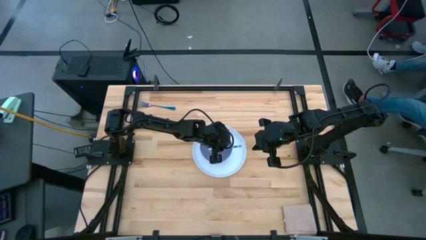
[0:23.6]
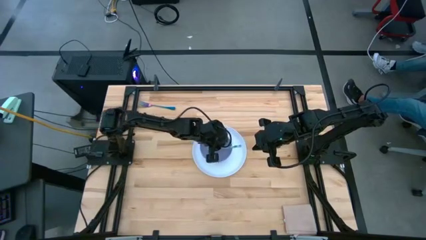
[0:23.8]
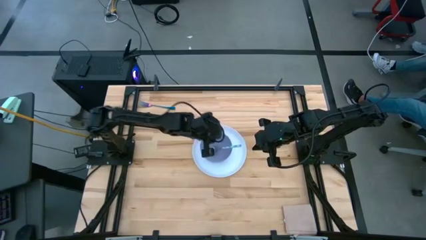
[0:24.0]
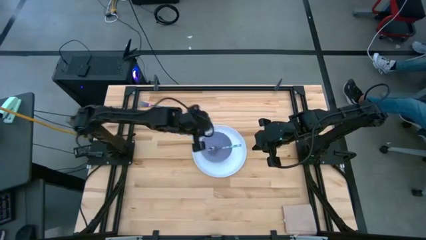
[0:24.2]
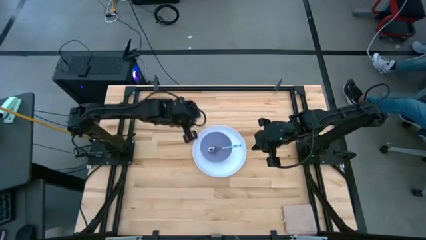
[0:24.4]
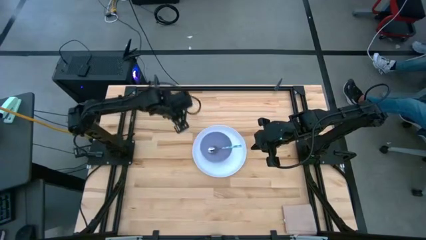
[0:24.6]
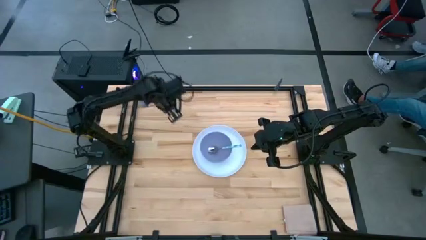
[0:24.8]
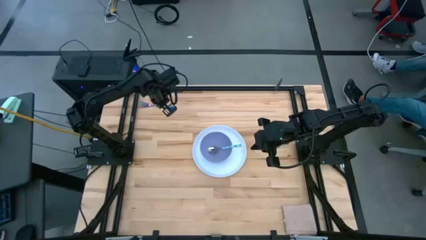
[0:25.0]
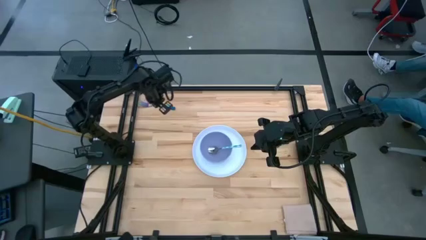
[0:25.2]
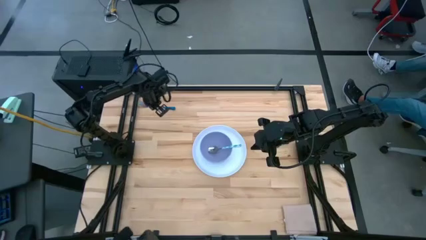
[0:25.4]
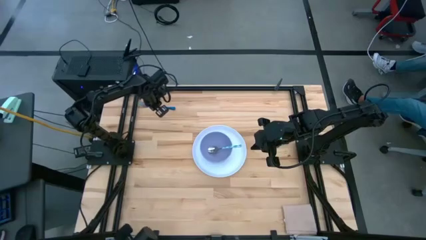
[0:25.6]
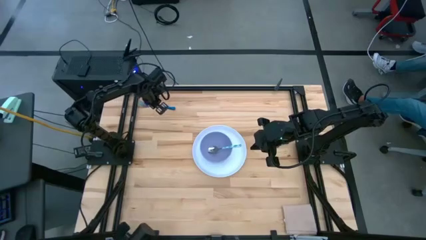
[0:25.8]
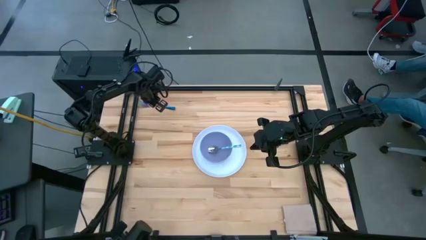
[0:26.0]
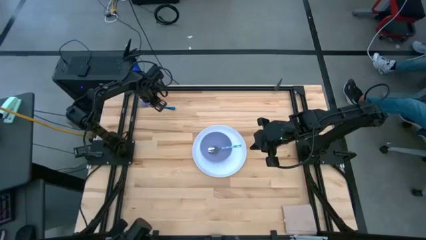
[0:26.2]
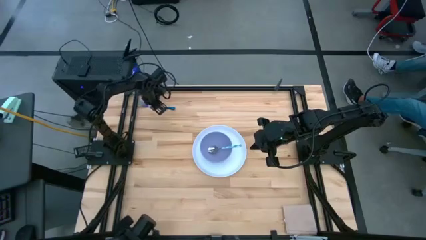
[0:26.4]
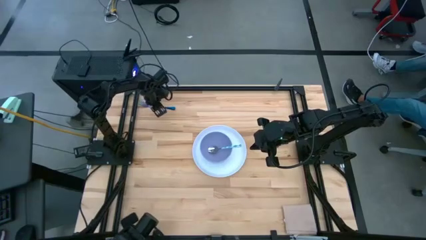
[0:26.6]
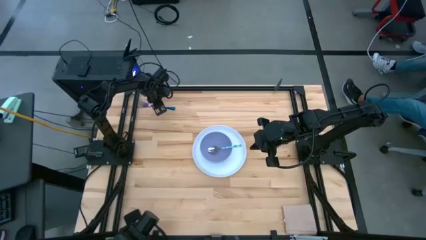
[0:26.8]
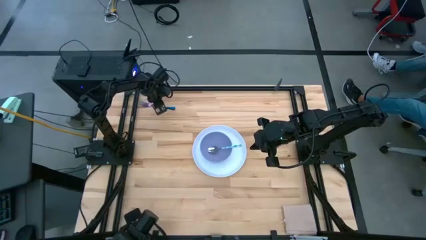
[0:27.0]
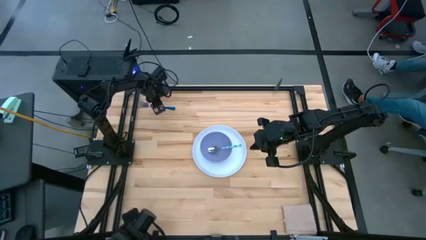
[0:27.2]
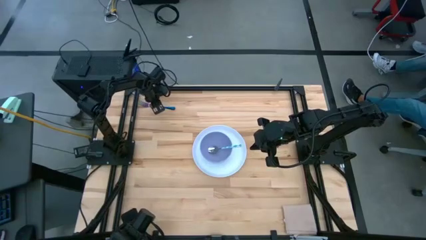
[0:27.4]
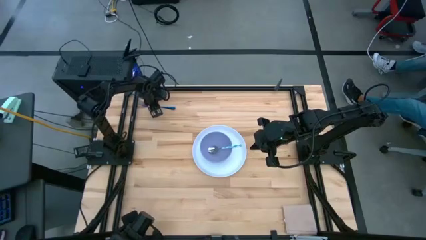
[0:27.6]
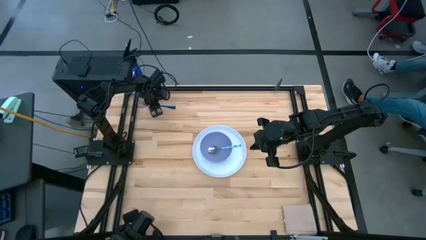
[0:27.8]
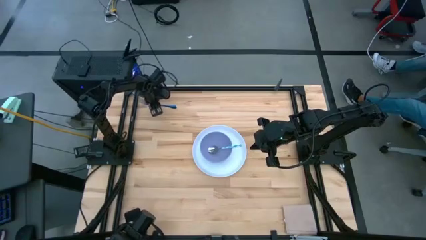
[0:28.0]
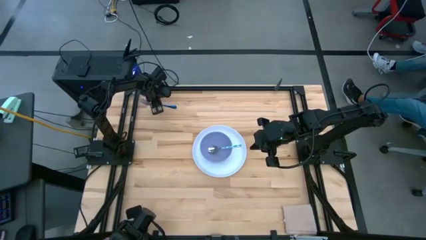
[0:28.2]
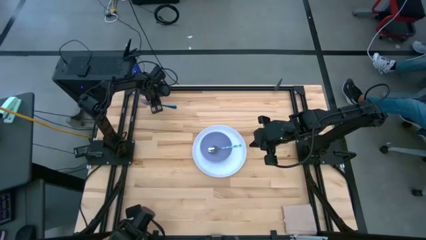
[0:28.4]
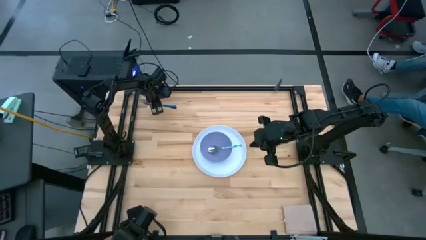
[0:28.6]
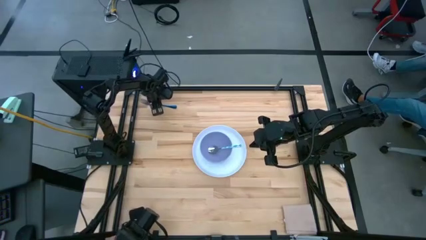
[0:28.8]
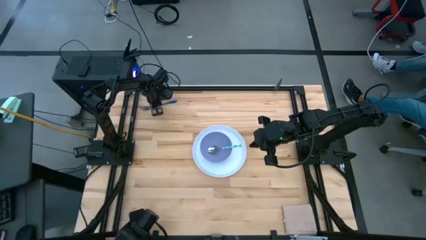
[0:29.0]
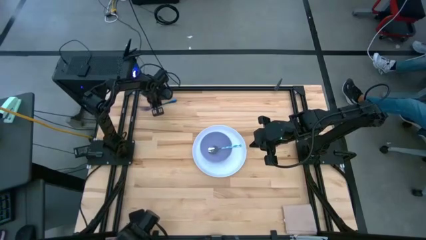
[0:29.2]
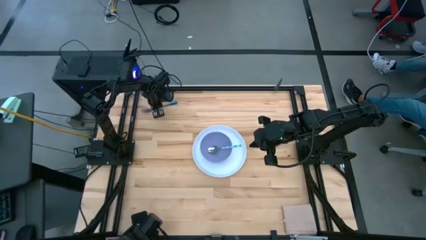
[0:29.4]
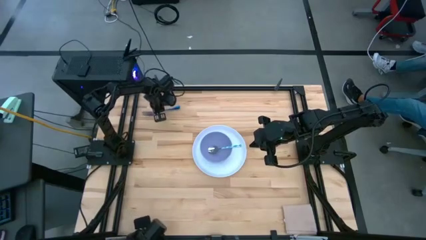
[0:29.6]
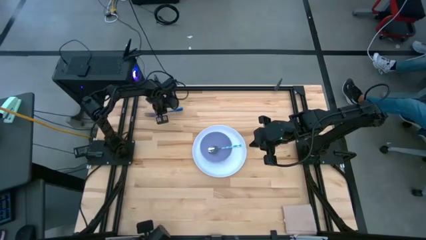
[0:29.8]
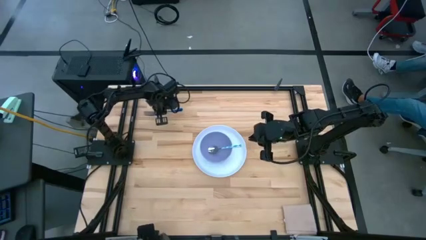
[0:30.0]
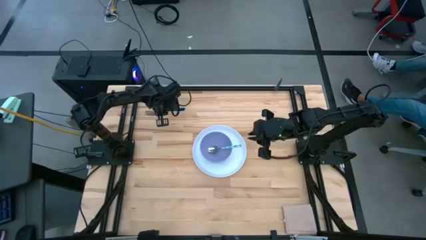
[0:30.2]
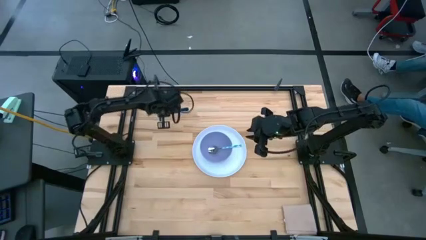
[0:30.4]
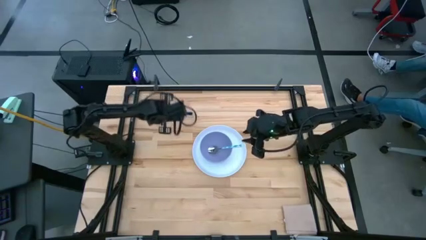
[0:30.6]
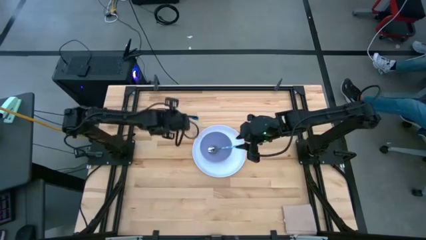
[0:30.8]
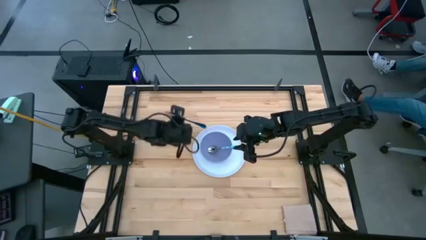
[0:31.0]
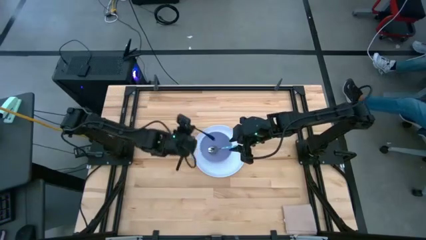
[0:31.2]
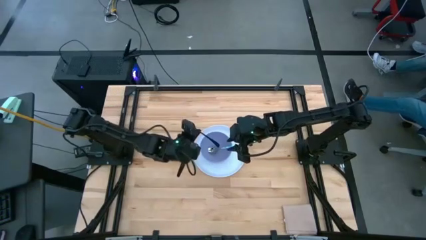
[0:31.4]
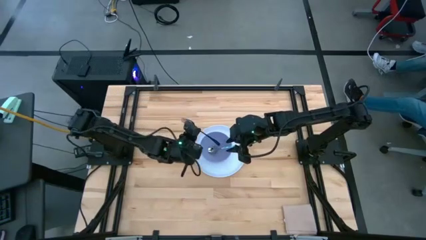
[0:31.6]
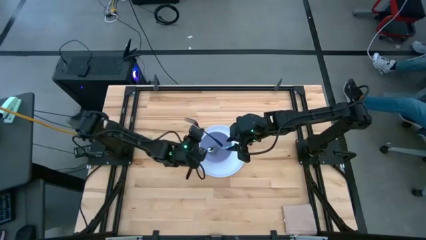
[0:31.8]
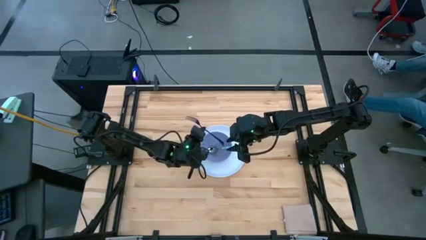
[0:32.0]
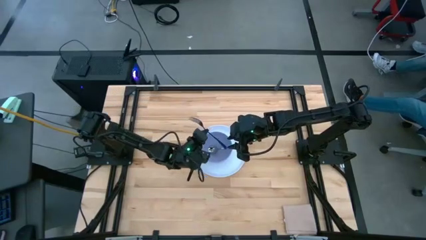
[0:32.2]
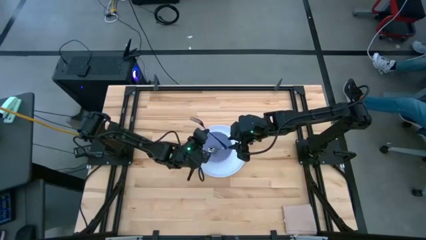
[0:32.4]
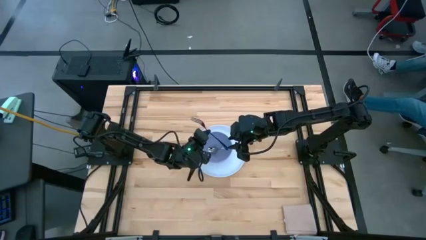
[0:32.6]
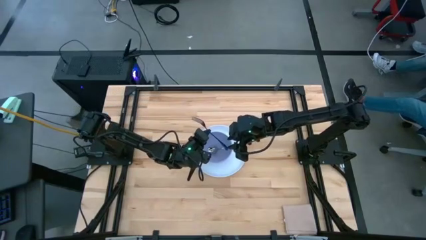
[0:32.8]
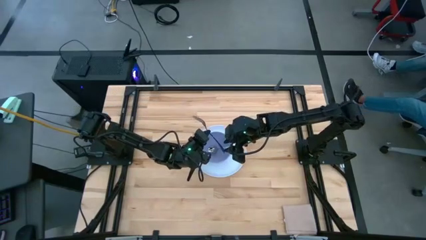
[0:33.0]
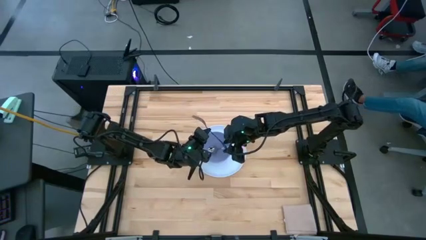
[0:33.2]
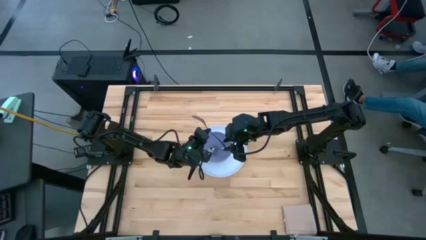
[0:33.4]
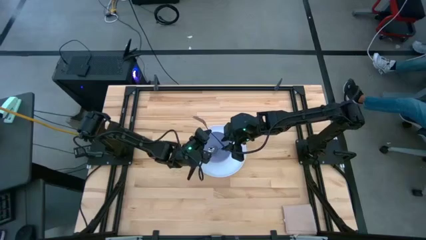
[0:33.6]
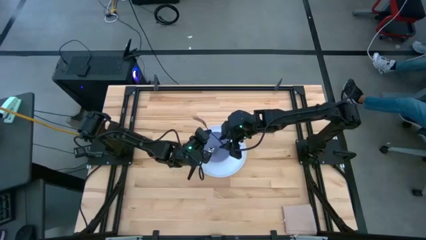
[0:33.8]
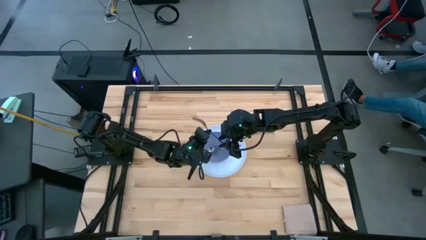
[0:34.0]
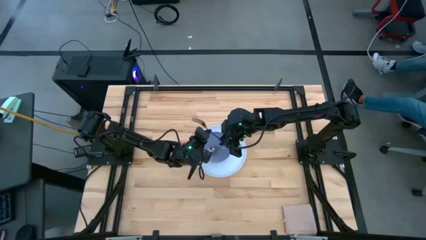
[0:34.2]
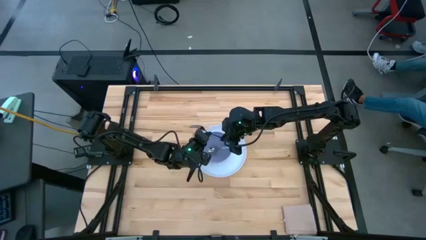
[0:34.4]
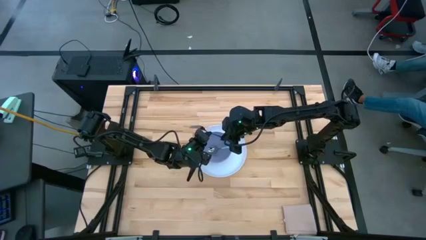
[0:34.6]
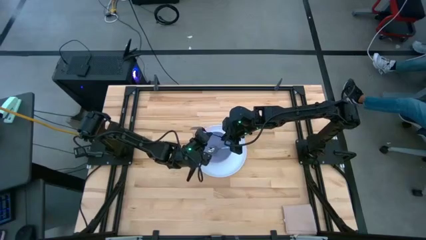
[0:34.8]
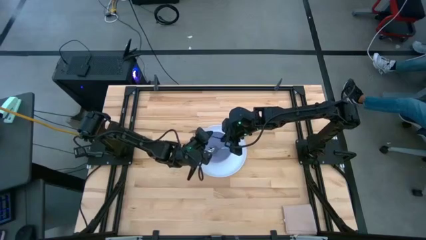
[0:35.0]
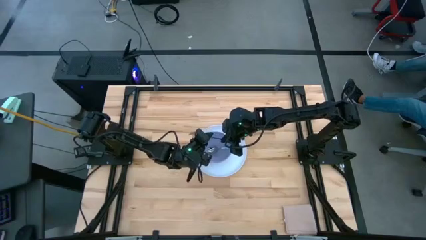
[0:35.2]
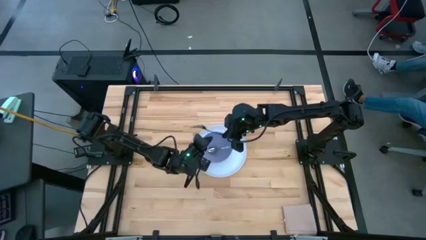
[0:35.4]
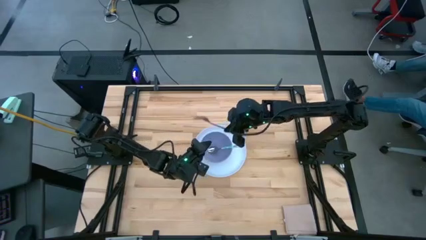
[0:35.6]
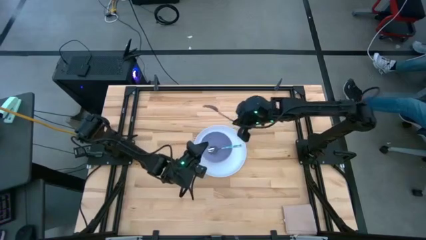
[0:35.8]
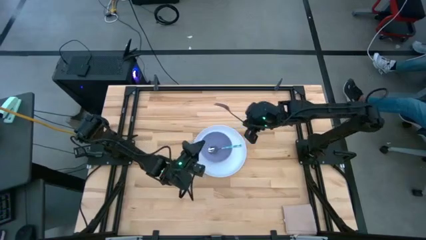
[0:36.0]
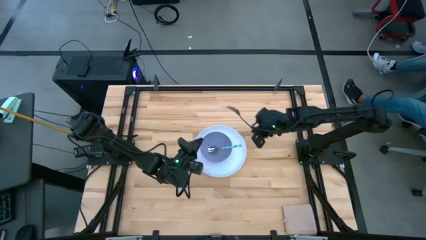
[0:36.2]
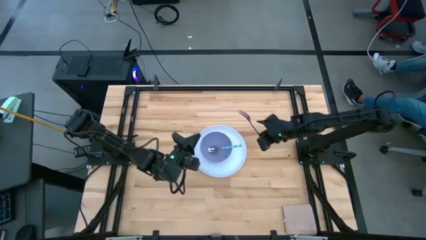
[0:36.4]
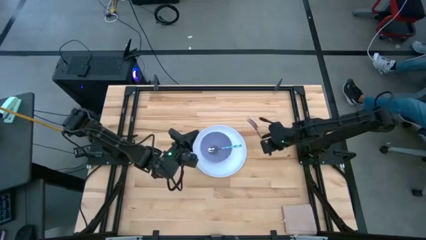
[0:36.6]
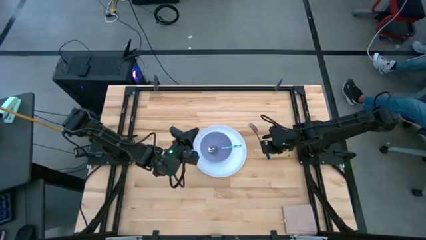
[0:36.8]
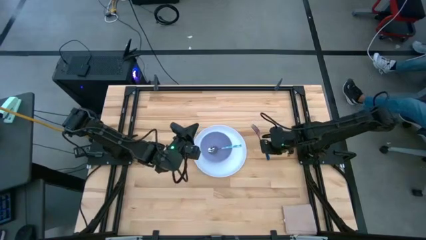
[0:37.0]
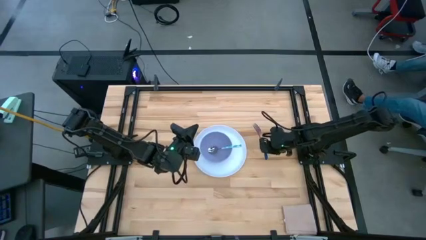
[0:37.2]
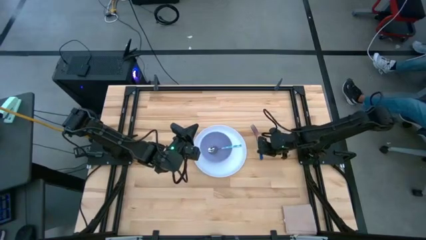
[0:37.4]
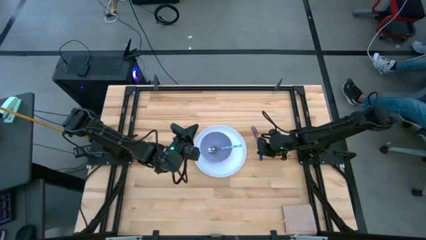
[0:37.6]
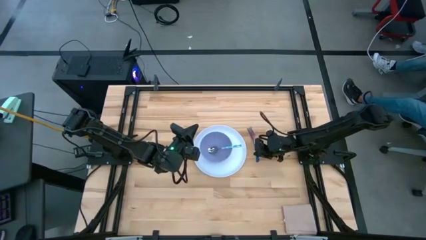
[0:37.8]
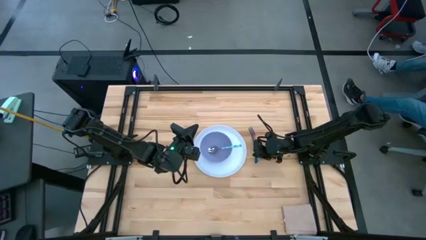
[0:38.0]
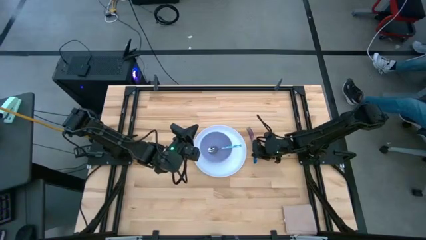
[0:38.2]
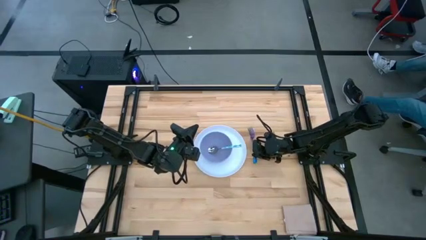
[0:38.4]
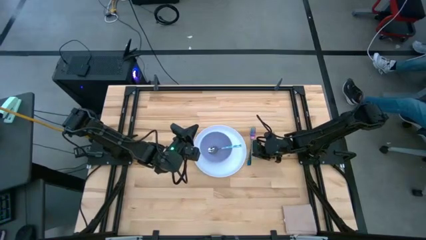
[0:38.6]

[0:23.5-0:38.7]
Task: Set table place
Put the fork on the right side of the plate
